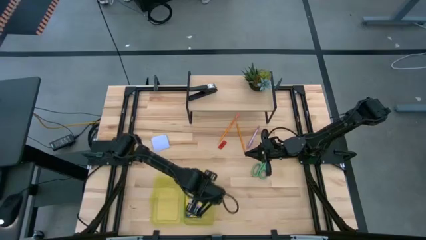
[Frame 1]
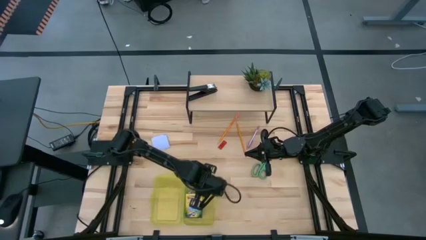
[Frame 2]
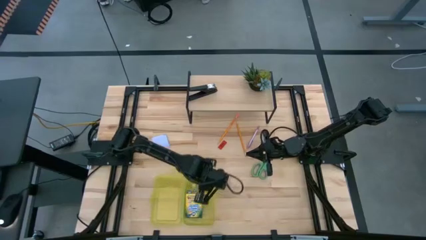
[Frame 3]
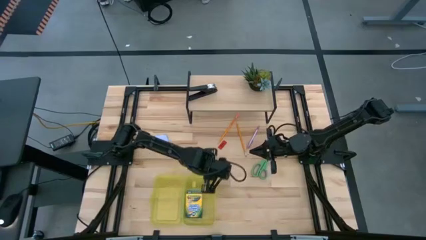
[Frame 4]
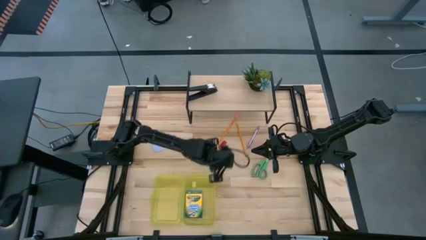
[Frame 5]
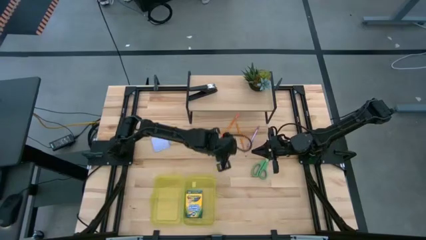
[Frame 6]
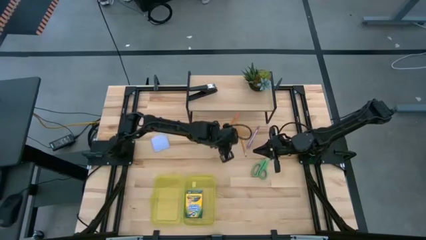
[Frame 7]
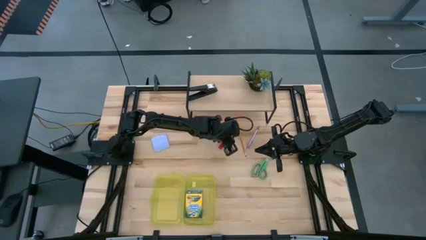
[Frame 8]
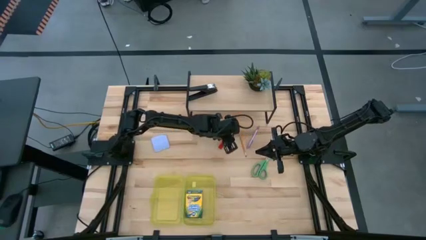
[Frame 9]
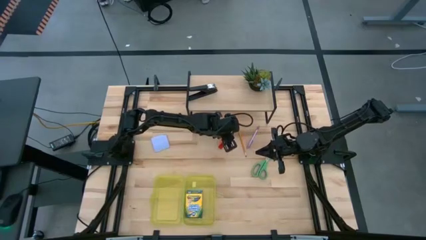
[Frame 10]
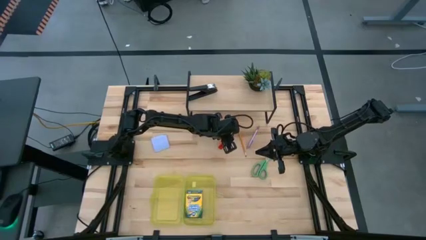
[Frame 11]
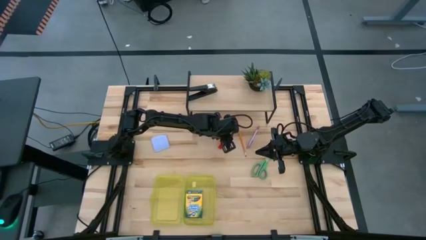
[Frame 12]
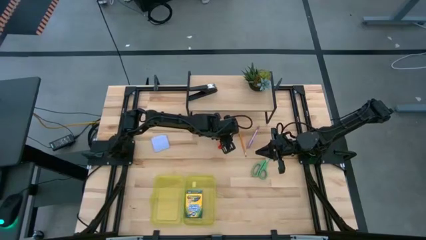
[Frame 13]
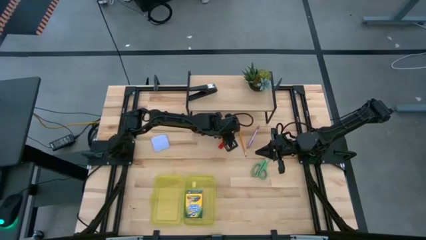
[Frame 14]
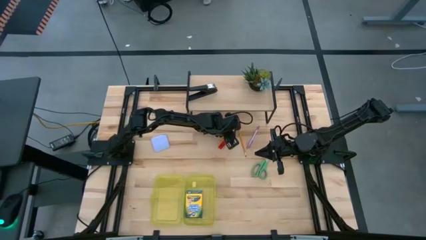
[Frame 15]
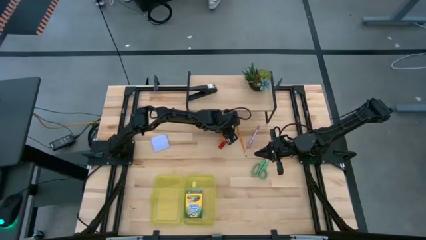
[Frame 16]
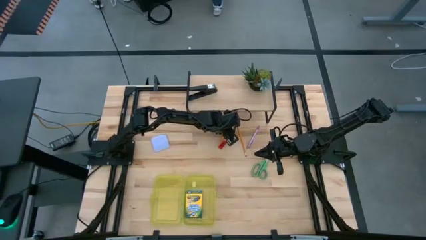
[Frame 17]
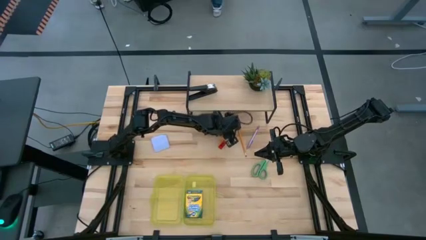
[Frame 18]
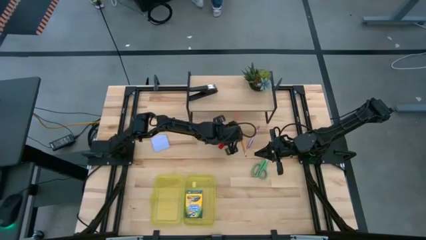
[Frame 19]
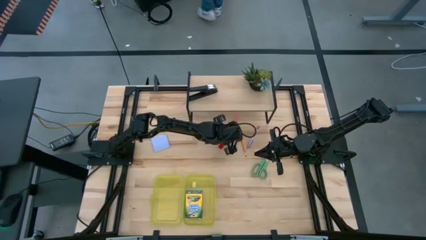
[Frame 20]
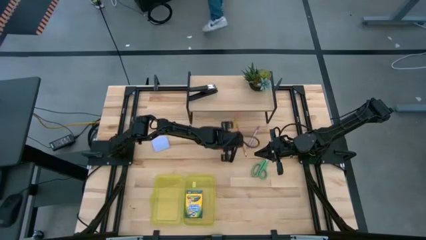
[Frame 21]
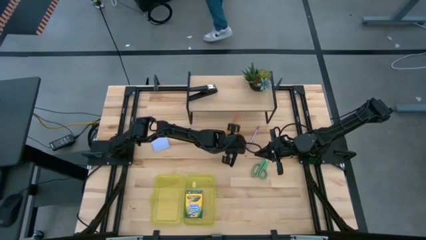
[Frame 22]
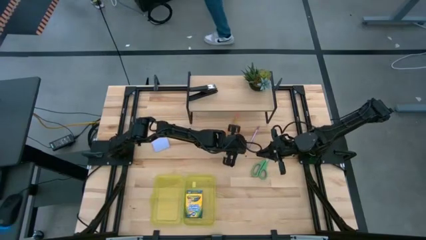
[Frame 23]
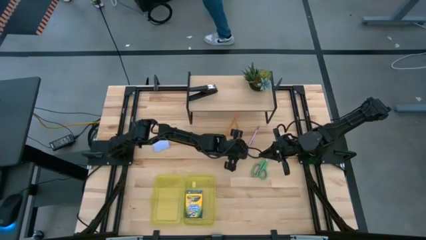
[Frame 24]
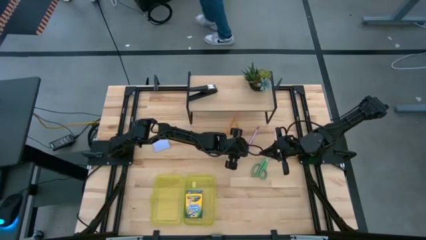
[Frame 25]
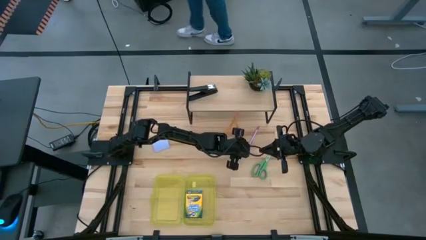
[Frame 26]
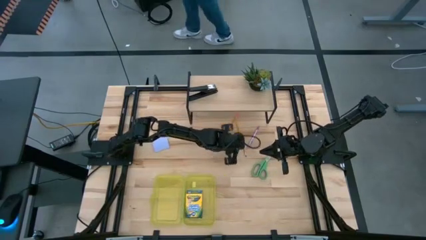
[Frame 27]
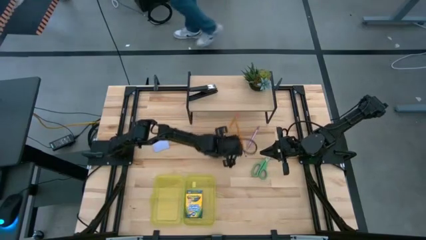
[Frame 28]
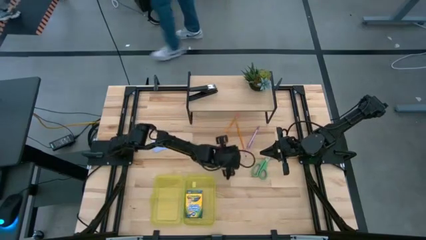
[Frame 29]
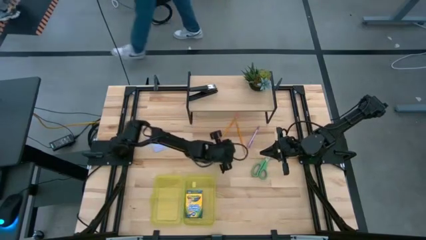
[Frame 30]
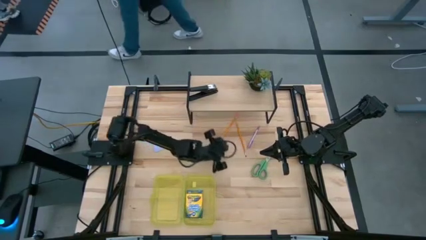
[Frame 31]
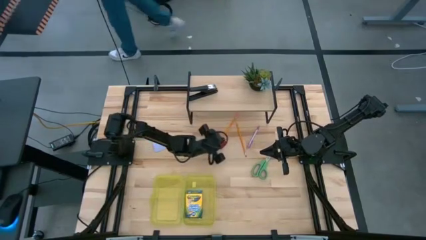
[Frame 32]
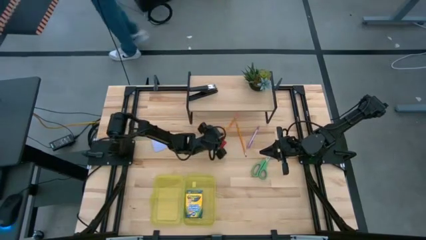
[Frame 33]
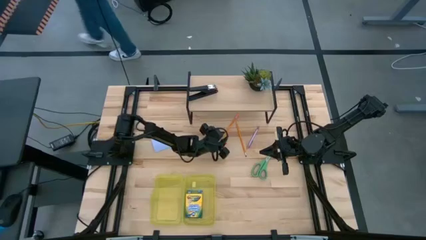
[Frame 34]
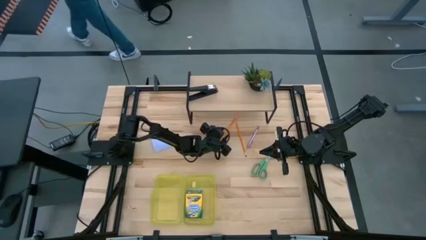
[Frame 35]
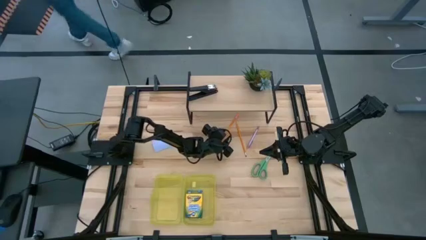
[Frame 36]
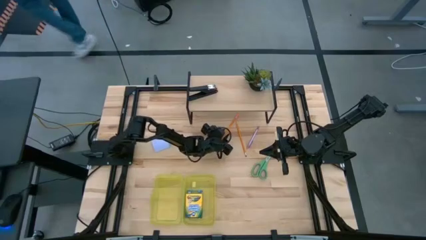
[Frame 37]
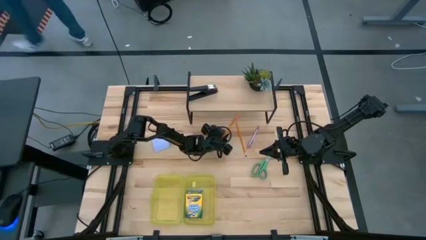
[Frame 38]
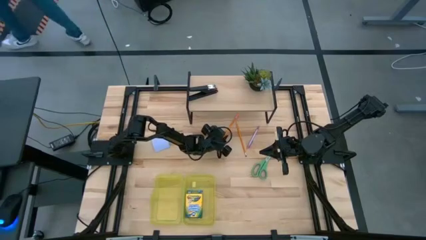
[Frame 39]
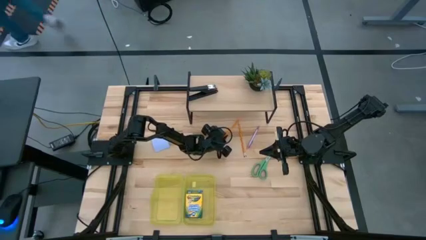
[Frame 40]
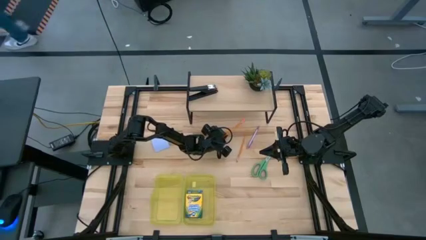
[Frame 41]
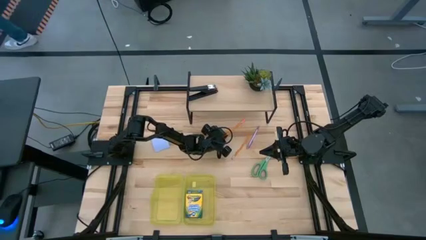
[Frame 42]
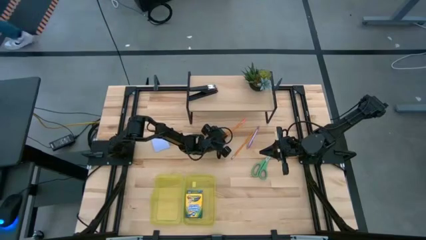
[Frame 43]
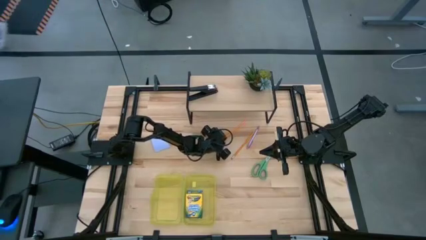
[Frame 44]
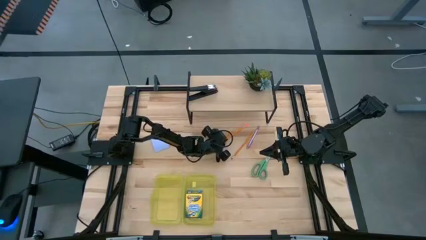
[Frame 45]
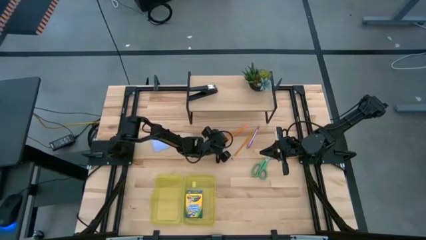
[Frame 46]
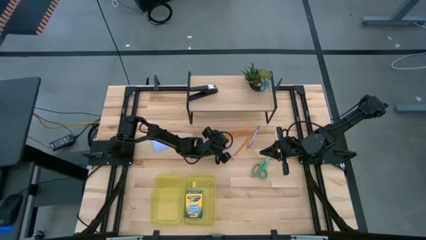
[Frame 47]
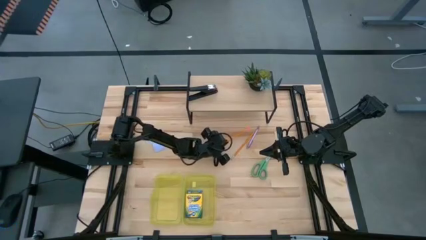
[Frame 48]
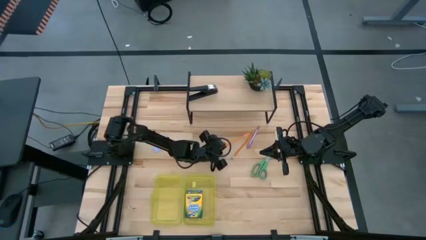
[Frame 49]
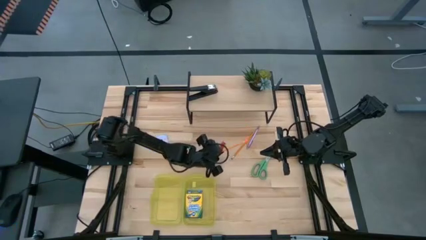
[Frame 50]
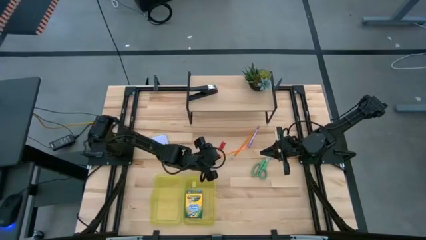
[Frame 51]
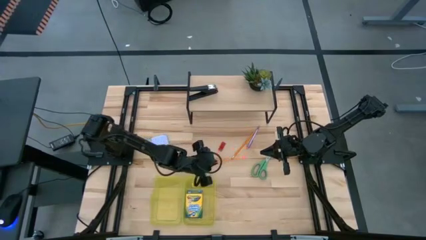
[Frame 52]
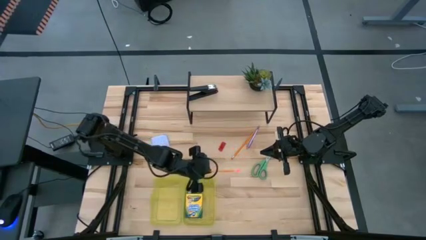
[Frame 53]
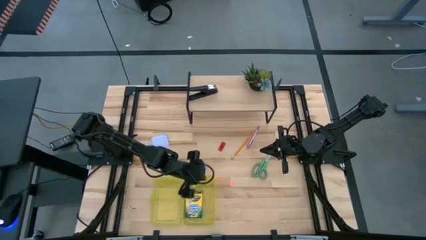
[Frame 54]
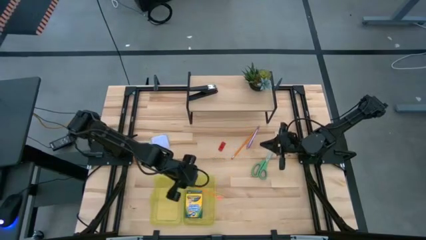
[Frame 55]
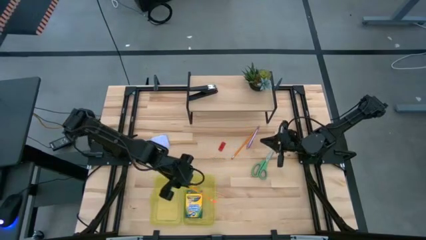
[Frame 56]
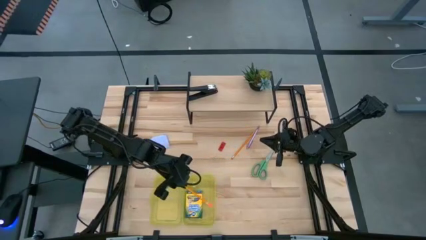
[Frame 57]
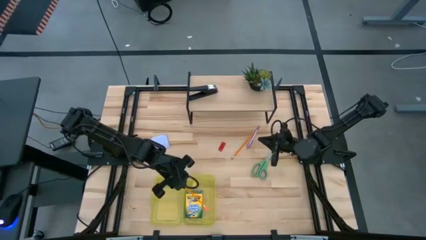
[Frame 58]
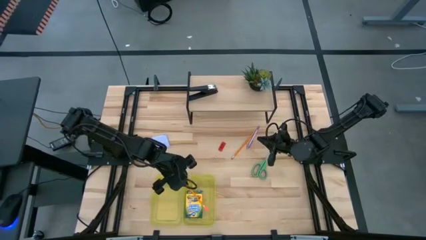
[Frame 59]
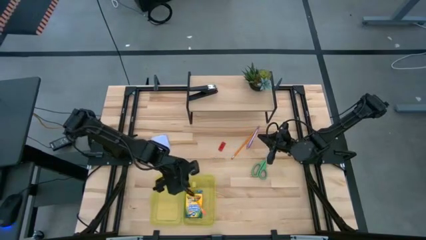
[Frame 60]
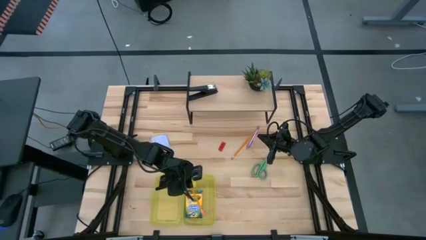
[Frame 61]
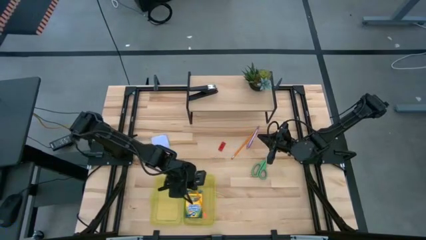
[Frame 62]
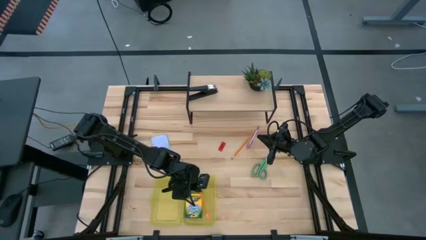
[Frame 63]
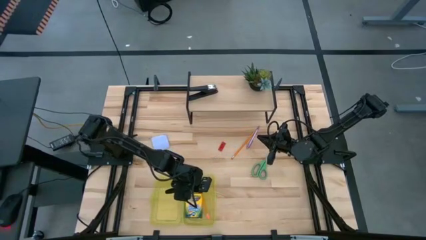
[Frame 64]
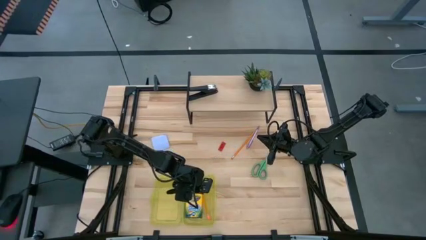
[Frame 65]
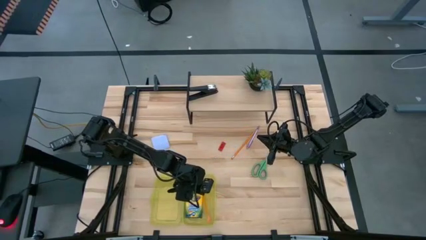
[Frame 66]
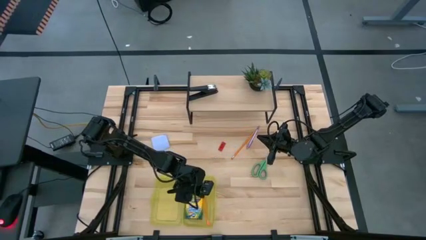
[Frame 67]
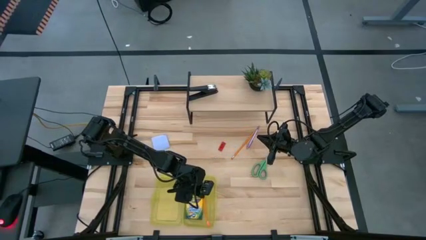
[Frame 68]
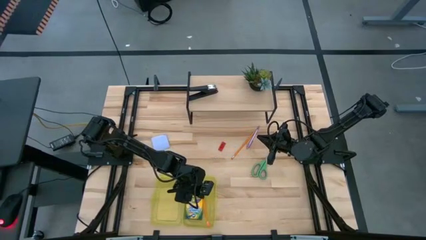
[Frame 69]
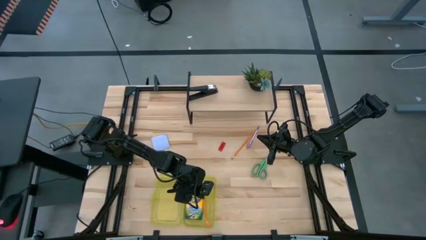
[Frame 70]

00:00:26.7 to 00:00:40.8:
Task: Pack school essentials
Put the left orange pencil into the yellow supply box
